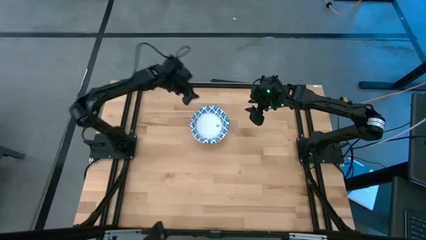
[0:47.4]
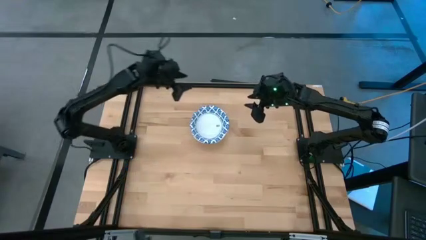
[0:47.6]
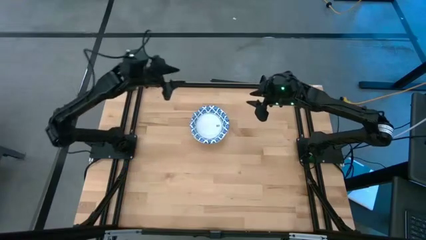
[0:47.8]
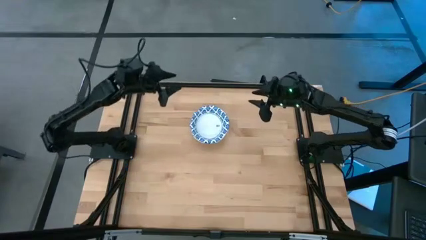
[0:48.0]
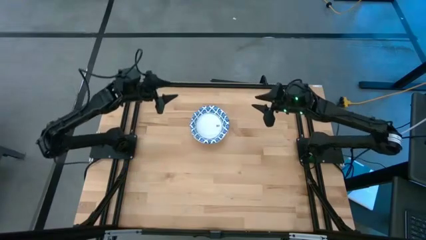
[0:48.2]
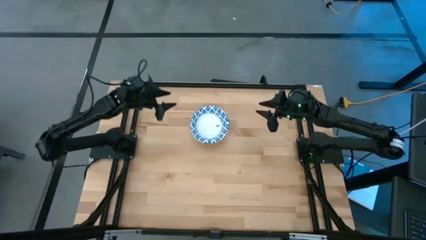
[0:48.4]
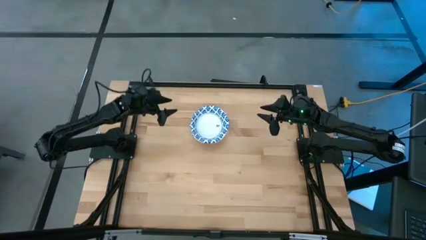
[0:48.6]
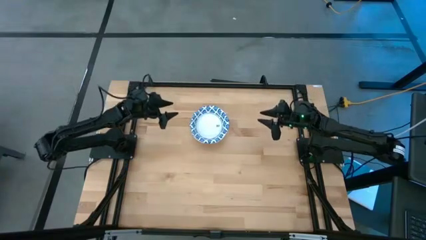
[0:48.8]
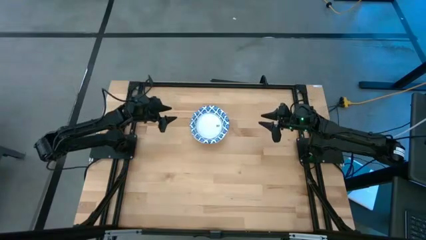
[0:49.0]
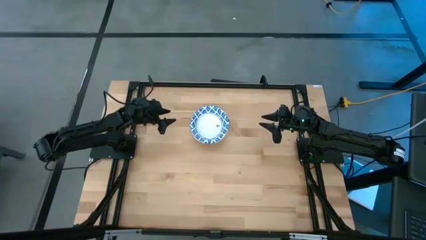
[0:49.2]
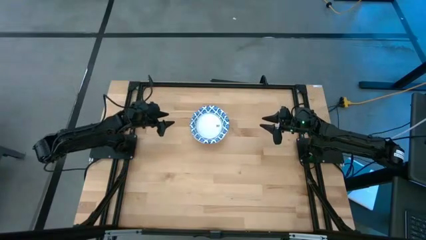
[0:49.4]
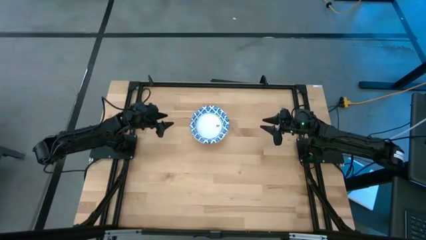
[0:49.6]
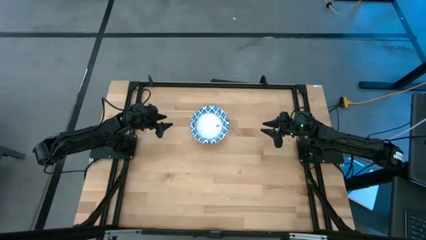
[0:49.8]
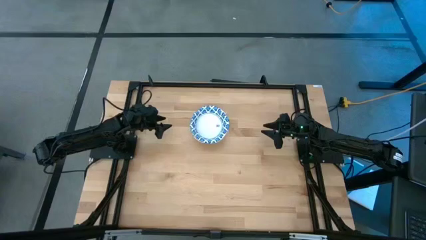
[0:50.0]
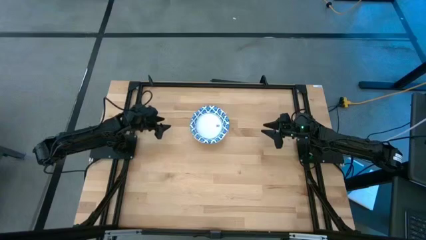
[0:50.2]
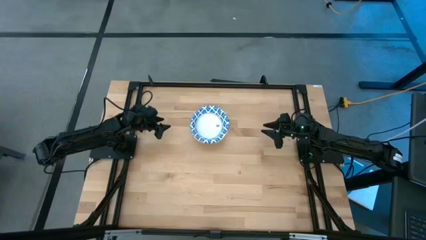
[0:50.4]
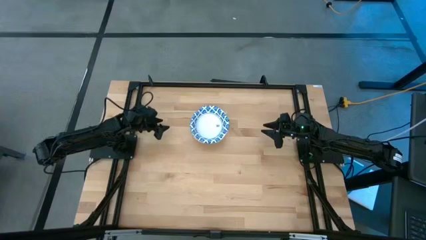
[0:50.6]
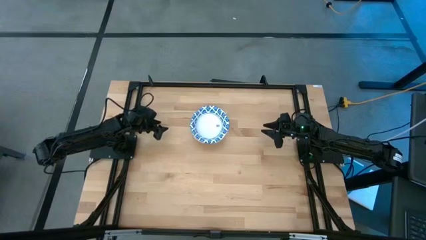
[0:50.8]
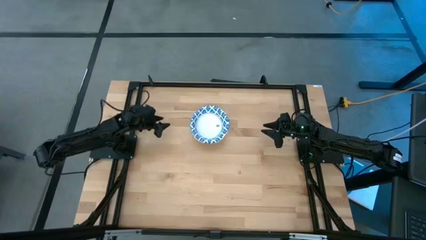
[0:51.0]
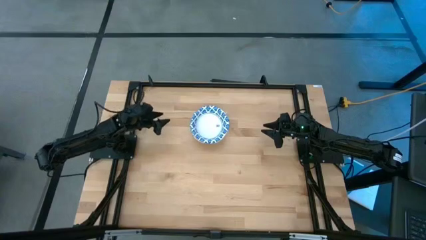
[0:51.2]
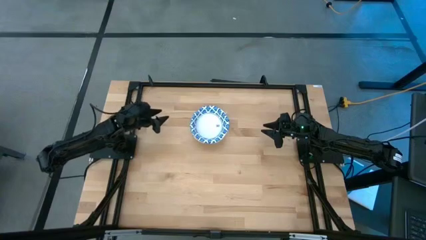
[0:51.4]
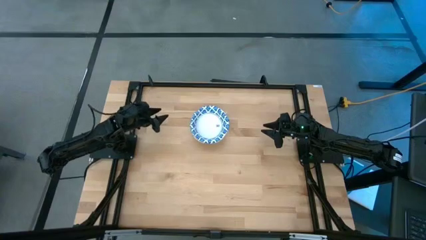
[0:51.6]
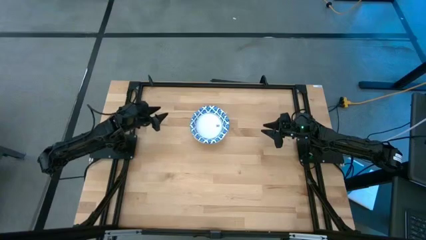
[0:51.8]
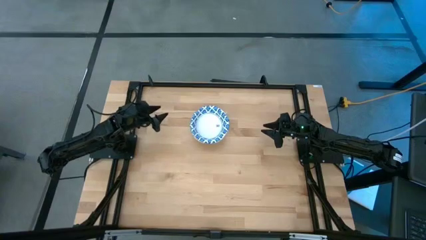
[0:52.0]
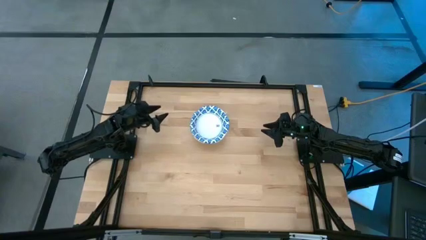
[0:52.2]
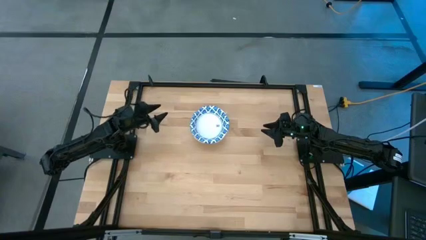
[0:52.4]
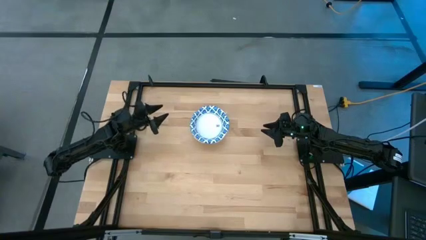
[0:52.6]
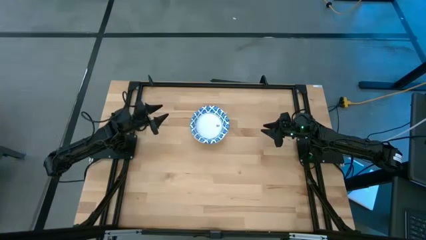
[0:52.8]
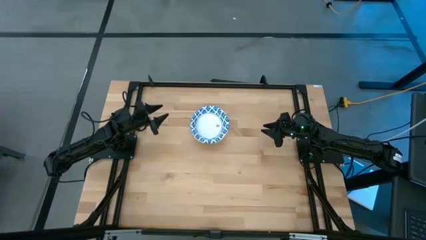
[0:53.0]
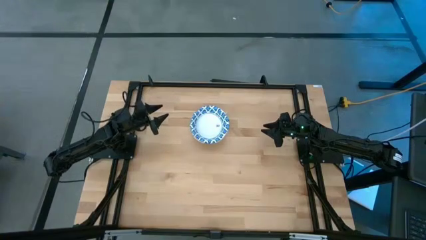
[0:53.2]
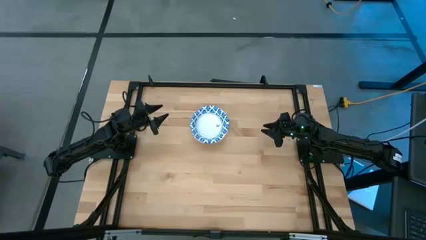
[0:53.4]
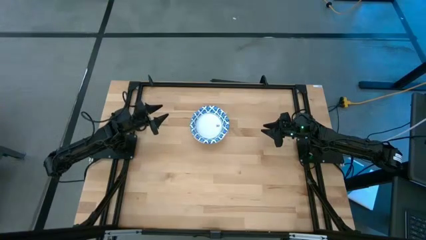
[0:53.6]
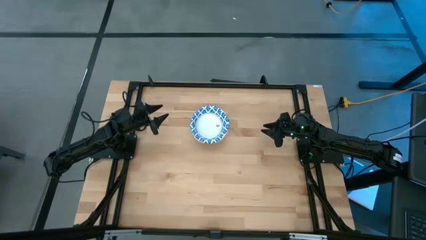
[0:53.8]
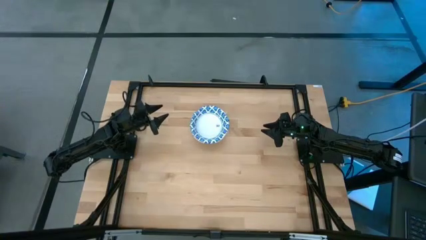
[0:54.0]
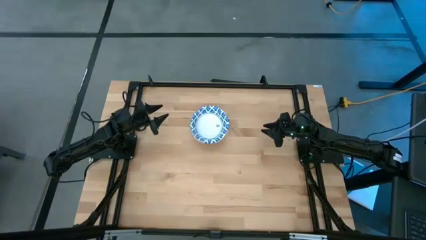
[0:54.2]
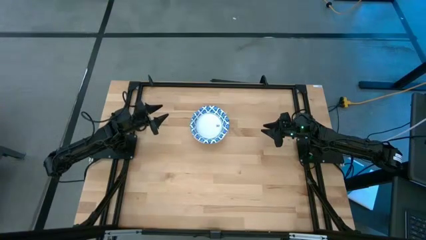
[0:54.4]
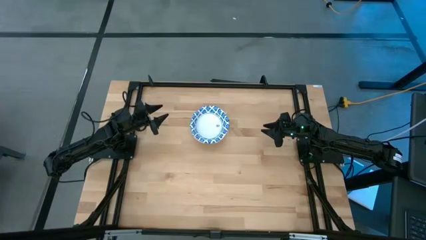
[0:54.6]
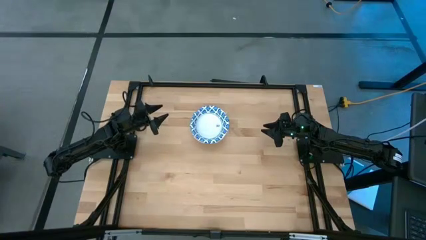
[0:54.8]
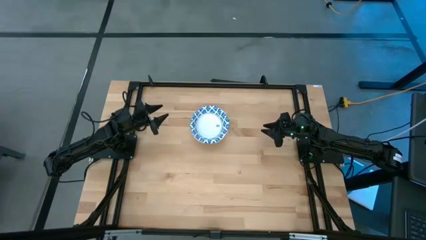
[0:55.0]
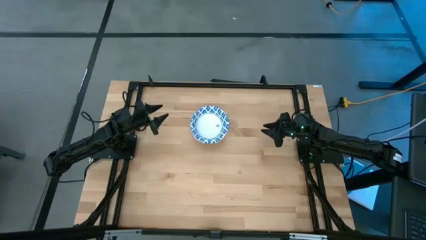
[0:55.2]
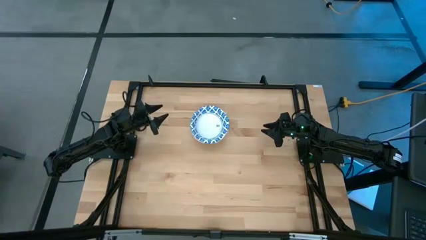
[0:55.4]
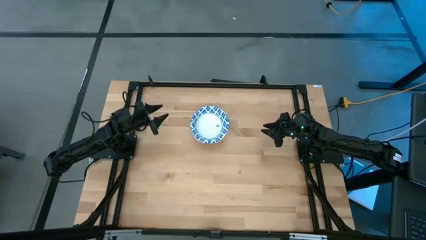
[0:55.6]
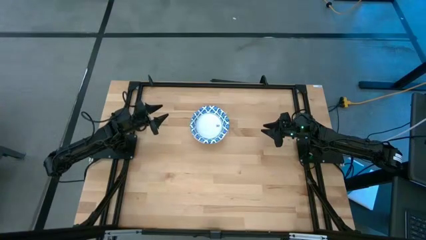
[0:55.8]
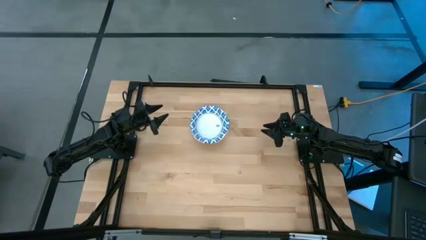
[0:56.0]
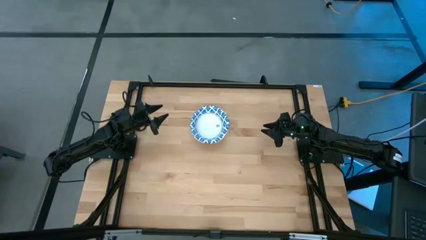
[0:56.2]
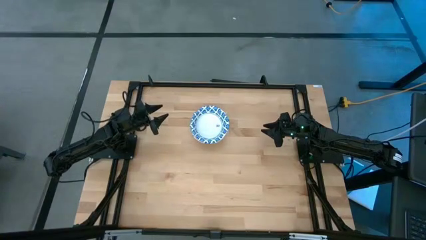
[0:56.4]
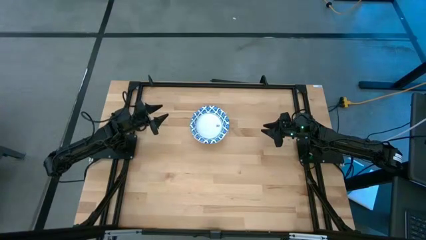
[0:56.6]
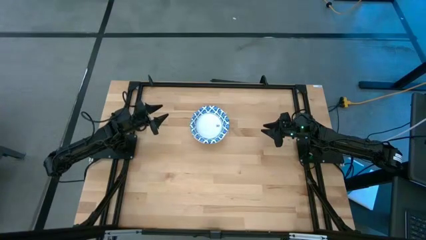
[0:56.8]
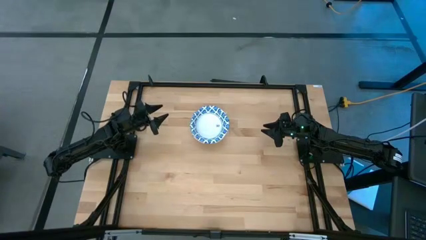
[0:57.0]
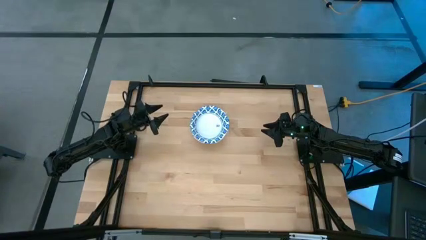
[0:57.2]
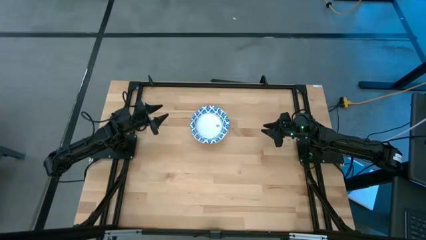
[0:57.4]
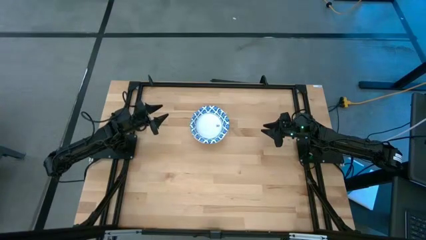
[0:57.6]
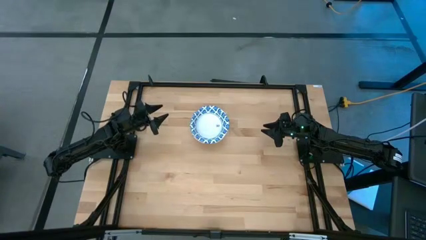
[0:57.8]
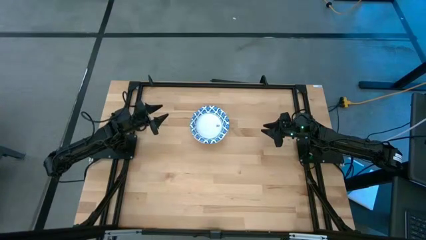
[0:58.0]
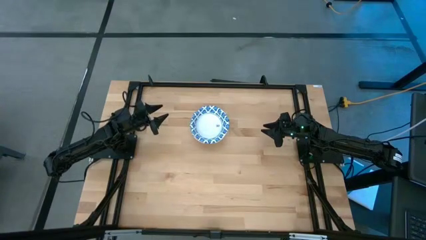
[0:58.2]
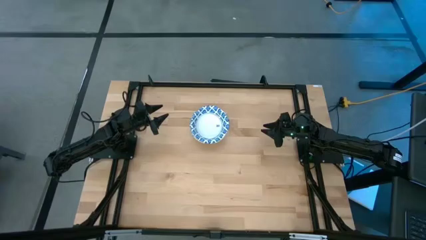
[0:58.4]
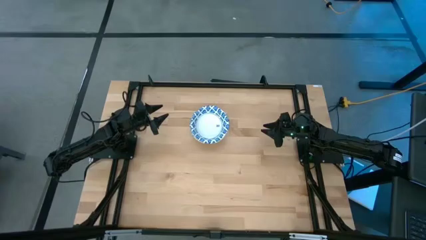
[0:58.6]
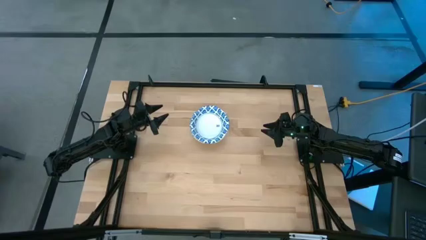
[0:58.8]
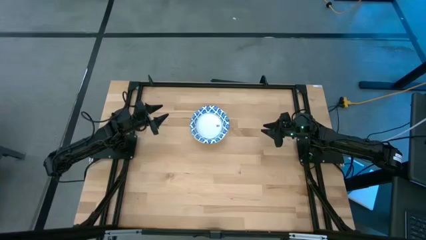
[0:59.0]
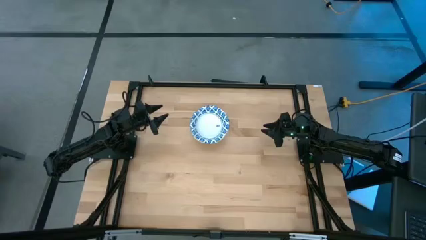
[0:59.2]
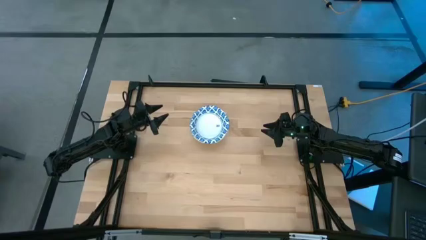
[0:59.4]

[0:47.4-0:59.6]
Task: Nest bowls inside each other
Return to Home Position

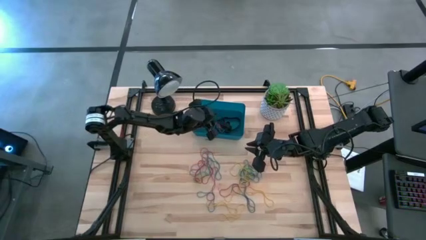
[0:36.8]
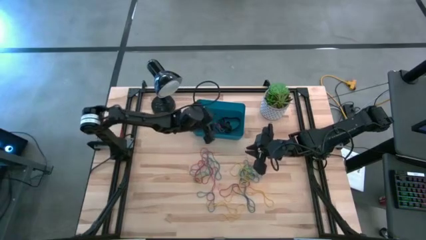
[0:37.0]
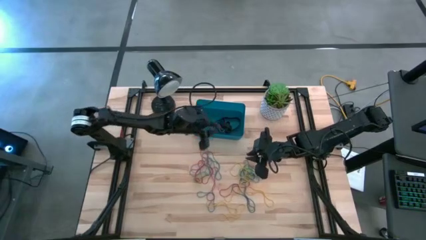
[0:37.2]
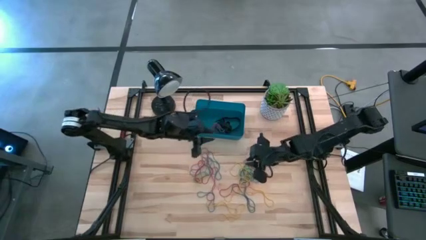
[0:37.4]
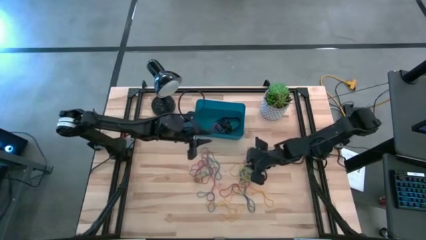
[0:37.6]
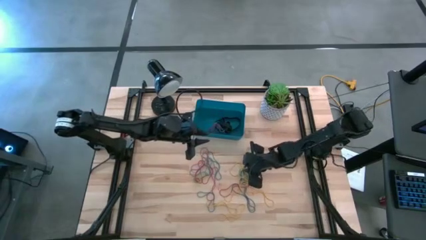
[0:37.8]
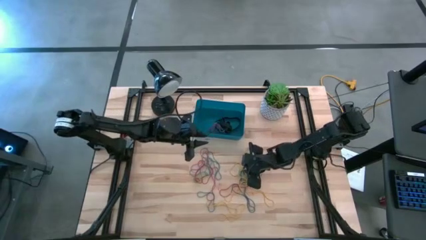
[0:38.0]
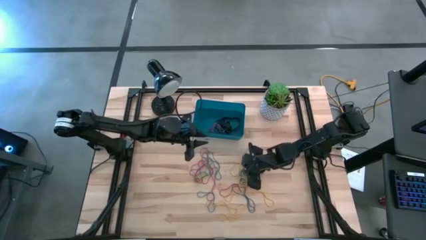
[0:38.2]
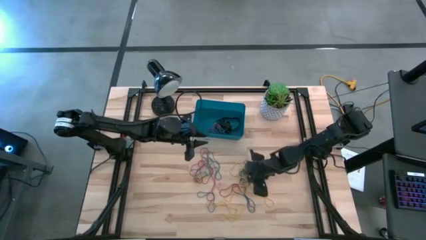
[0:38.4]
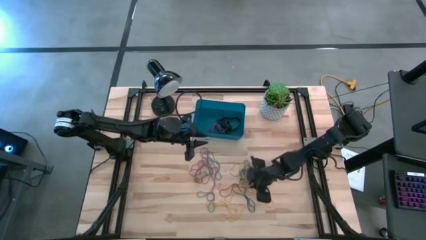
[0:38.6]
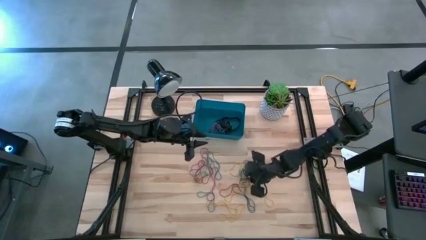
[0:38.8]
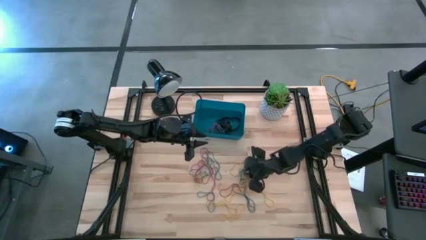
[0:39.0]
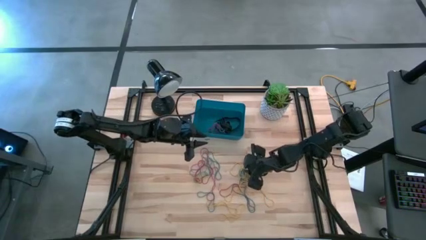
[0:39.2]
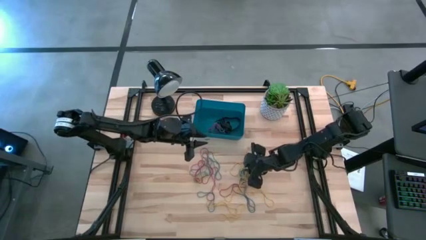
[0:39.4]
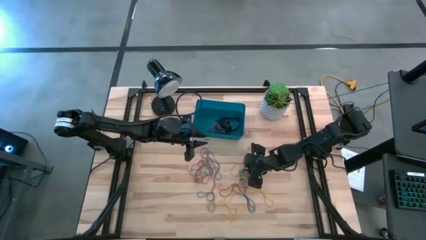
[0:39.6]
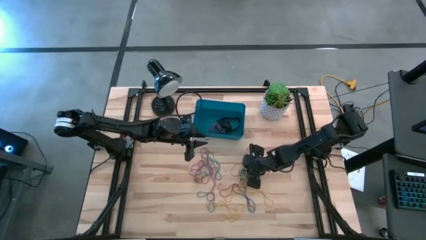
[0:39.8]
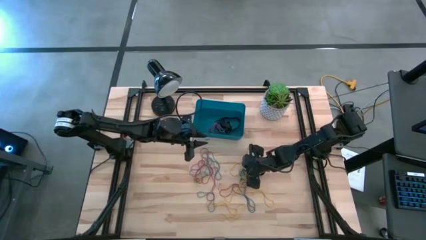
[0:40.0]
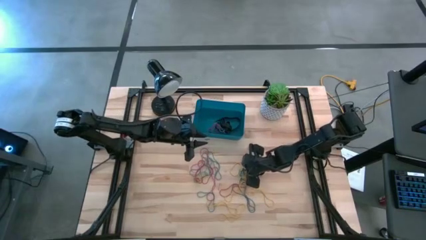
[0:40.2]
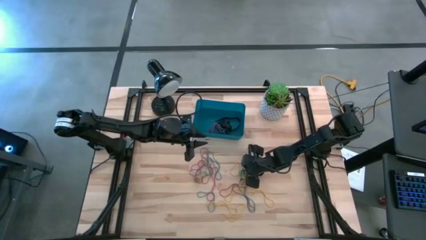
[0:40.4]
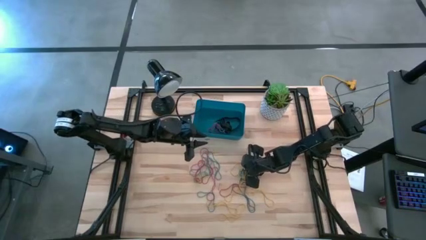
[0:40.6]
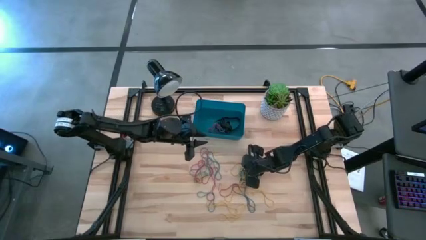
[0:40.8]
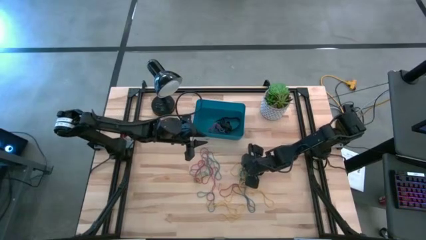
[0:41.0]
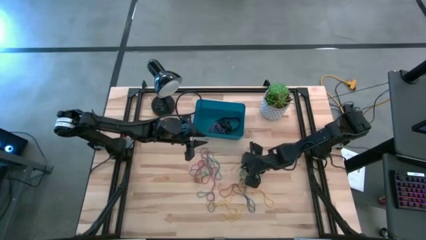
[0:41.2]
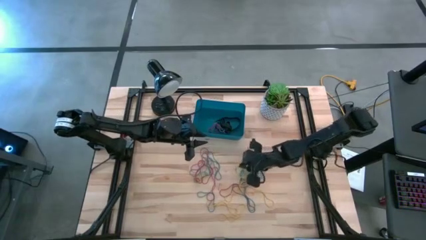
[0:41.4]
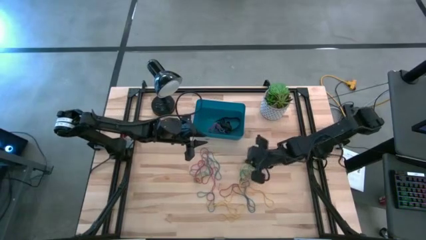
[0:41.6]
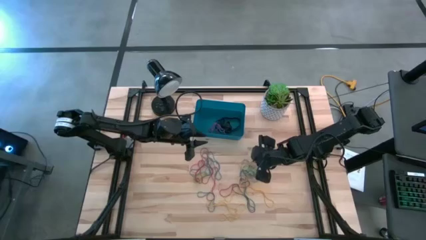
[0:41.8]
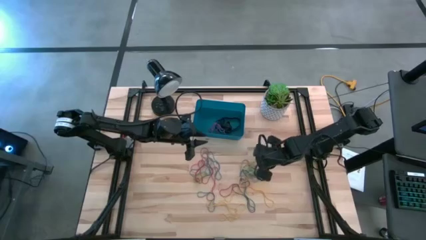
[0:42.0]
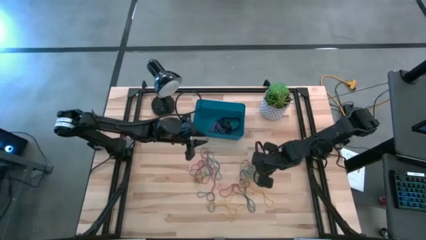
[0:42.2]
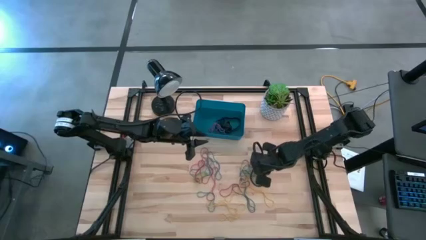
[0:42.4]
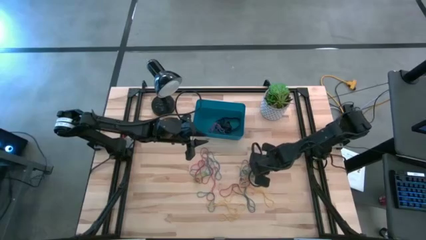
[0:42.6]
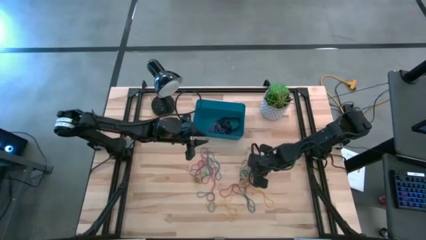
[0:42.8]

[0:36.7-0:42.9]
Task: Pick and place rubber bands into bin
Put the yellow rubber band into the blue bin
